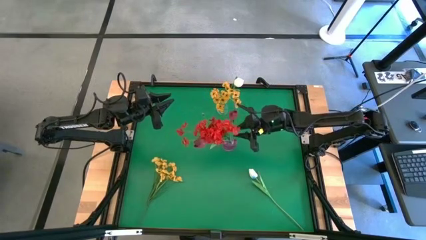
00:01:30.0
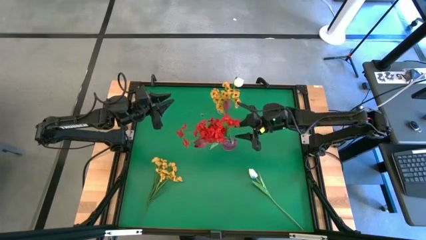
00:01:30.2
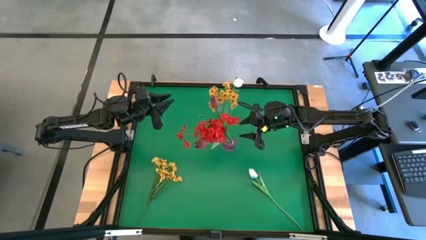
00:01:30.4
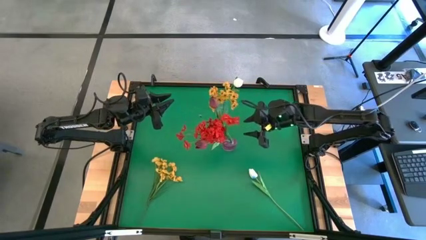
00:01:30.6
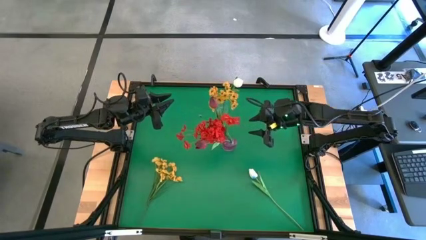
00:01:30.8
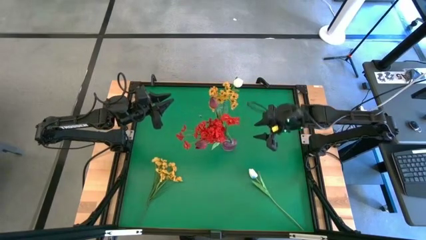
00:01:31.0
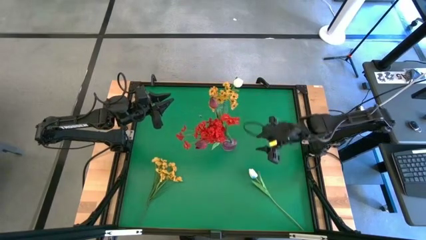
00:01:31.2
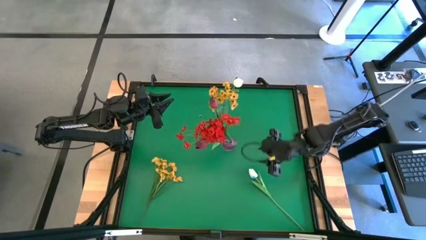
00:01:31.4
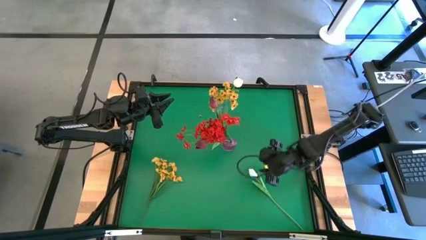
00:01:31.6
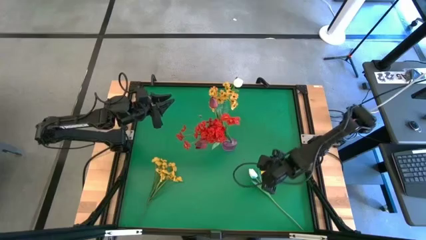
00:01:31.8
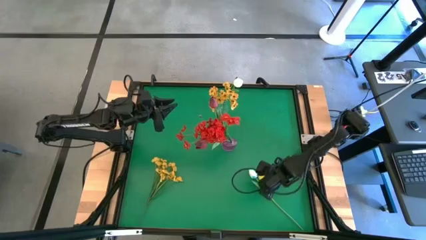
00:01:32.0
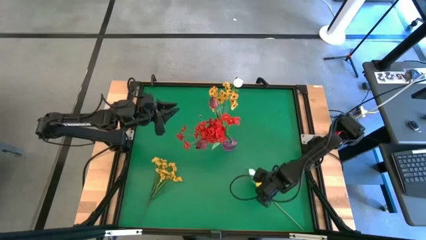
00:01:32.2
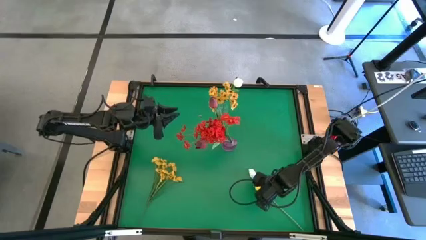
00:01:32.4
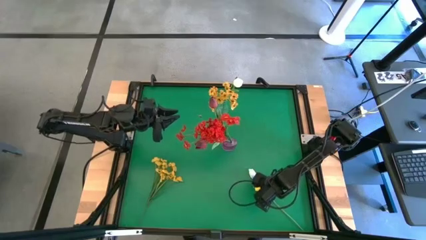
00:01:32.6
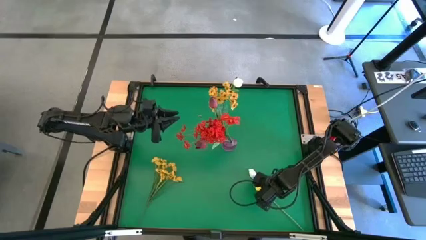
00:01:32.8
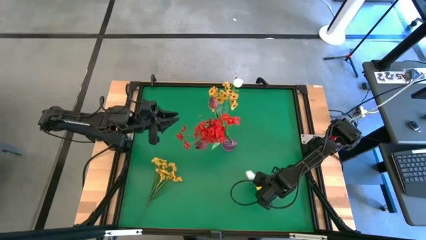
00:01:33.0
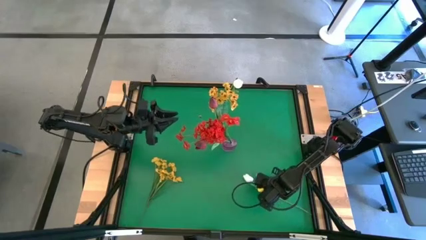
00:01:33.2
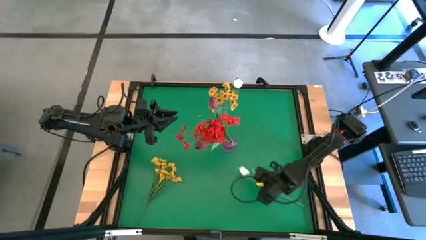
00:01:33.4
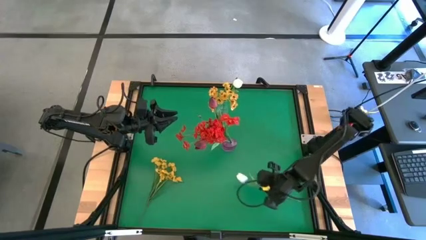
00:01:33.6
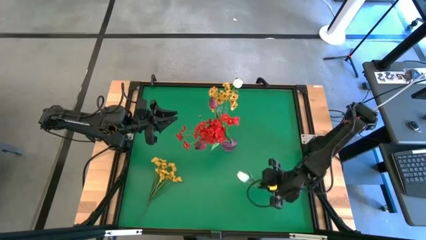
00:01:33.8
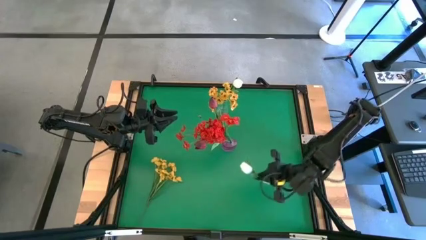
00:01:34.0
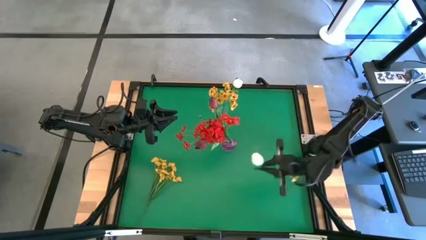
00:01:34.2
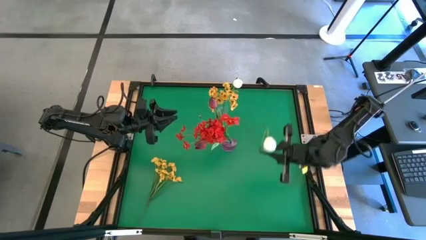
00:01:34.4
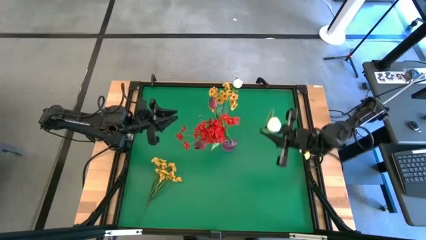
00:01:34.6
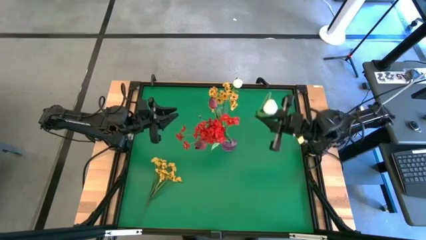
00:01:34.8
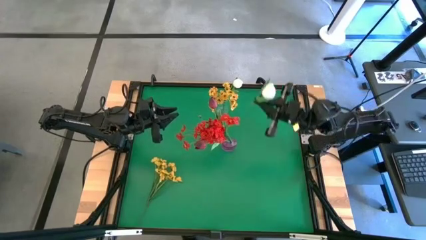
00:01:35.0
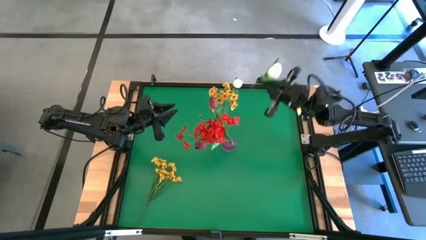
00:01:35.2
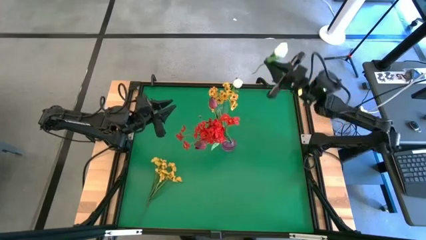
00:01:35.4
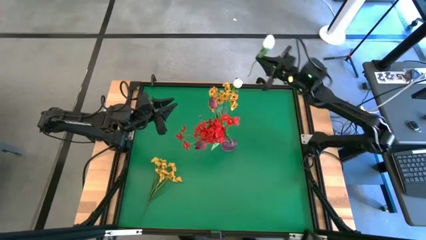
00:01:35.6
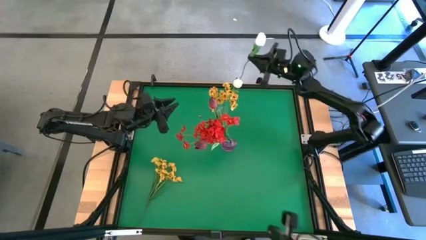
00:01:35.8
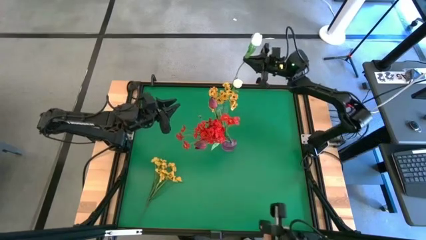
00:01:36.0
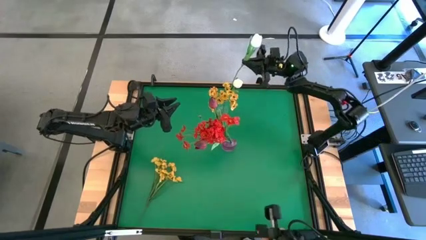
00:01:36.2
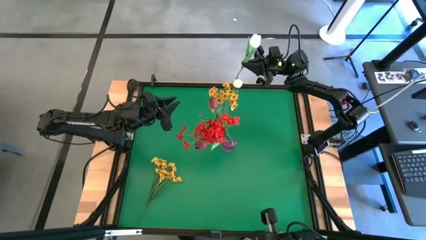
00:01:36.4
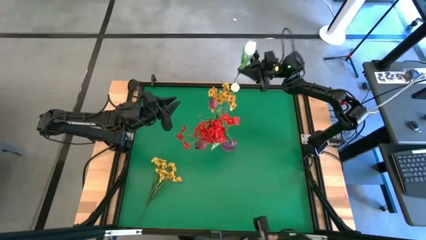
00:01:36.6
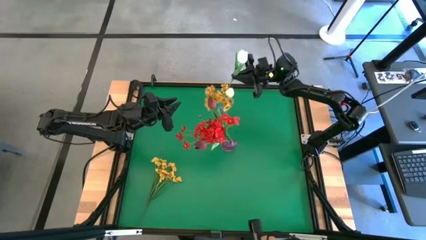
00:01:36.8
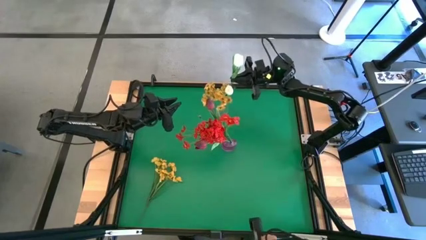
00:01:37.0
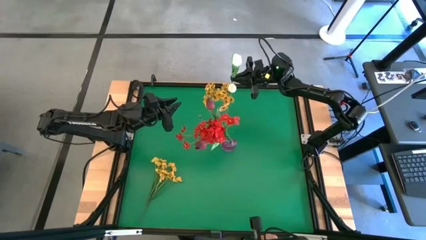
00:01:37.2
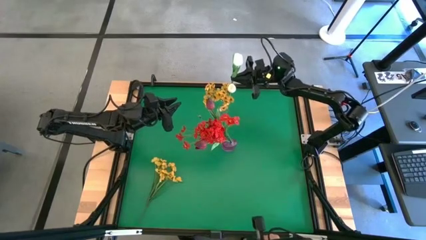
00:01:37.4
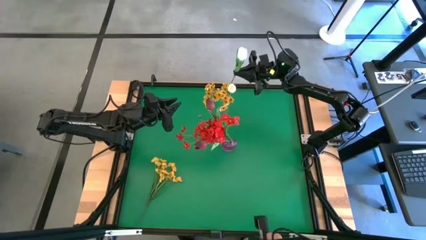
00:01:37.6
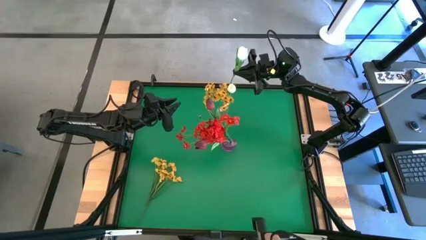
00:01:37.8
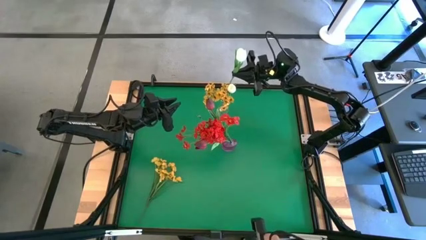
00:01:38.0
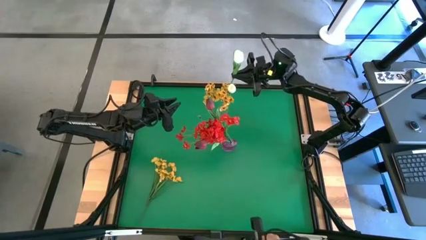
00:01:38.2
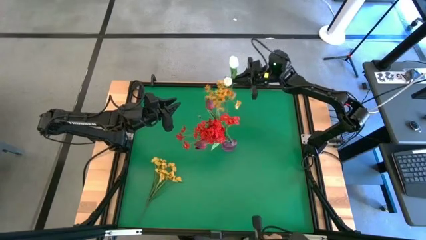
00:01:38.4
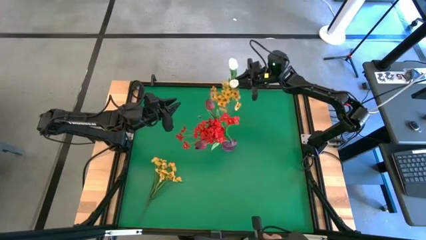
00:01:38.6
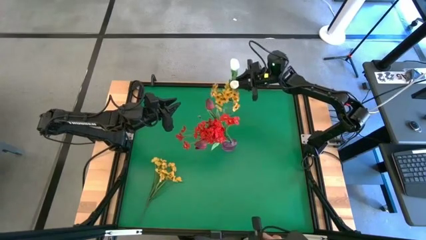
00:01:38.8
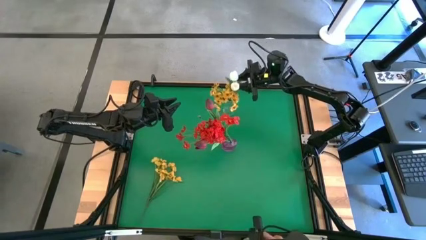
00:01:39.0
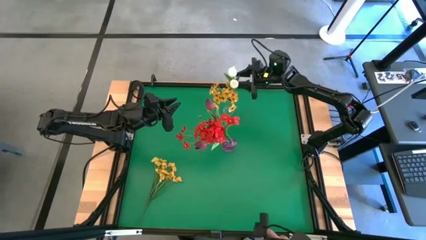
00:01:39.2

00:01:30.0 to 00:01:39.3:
Task: Sort flowers into vase by color
Put the white flower into the transparent vase

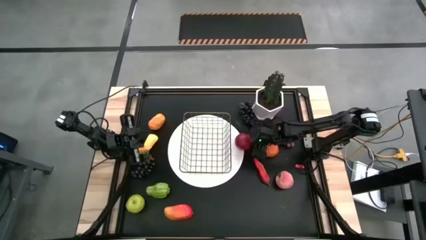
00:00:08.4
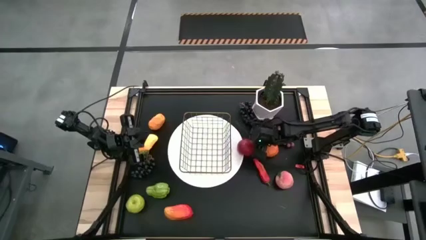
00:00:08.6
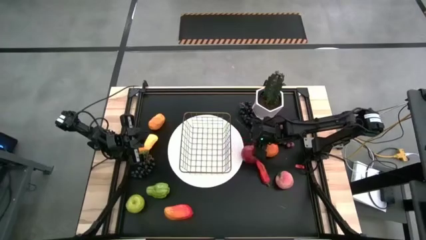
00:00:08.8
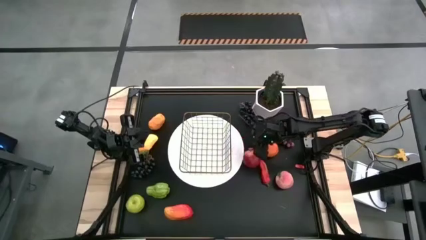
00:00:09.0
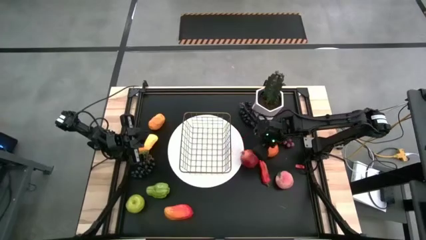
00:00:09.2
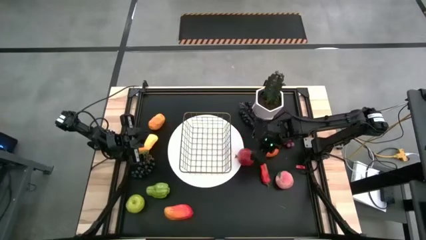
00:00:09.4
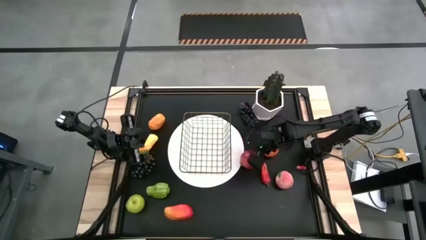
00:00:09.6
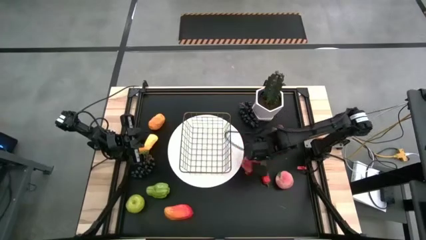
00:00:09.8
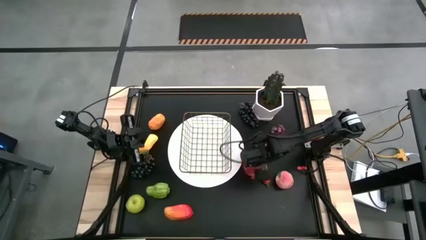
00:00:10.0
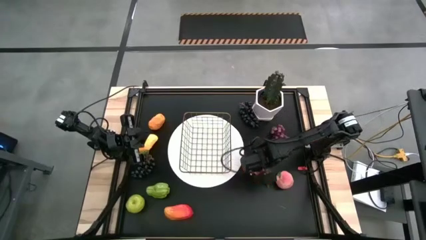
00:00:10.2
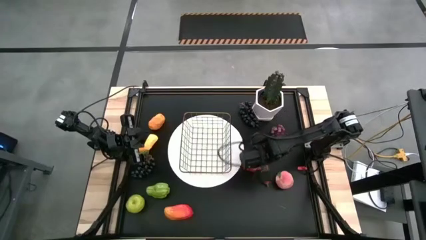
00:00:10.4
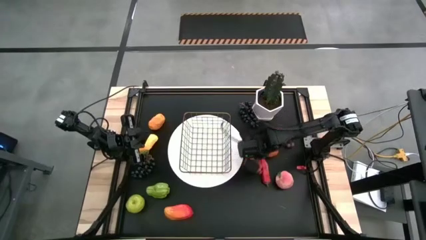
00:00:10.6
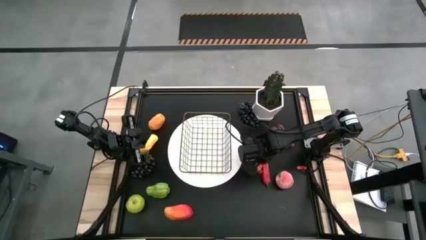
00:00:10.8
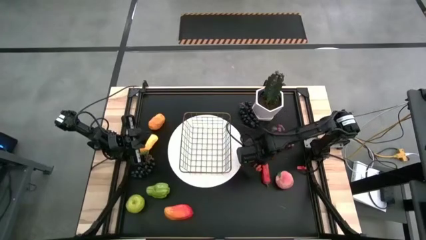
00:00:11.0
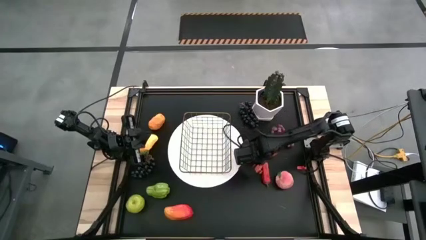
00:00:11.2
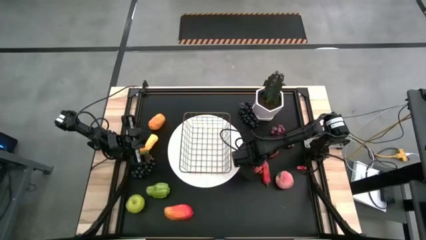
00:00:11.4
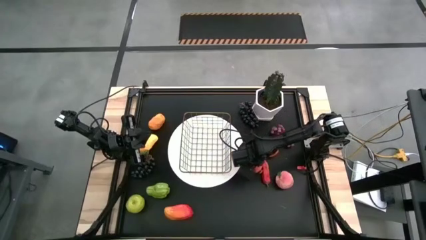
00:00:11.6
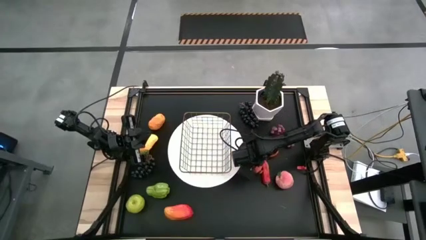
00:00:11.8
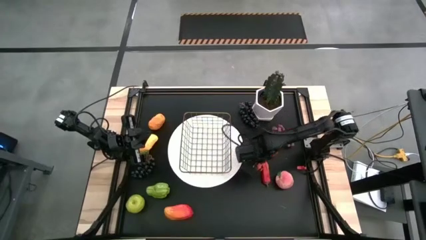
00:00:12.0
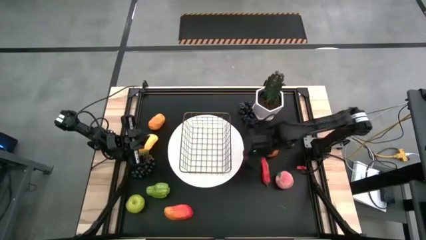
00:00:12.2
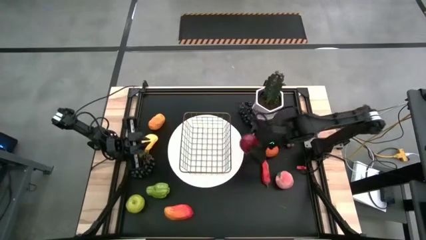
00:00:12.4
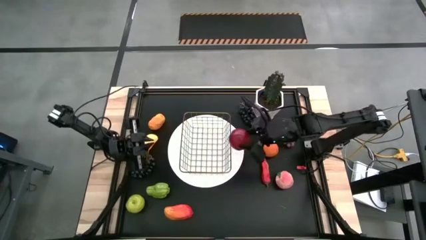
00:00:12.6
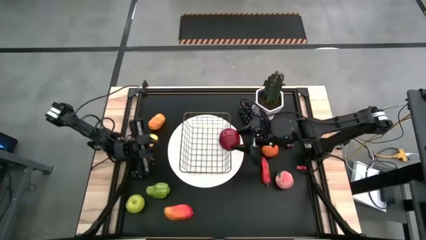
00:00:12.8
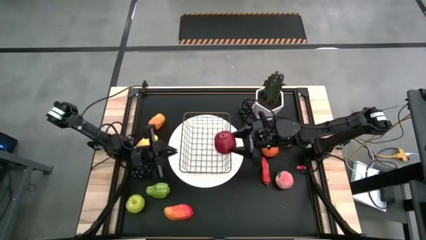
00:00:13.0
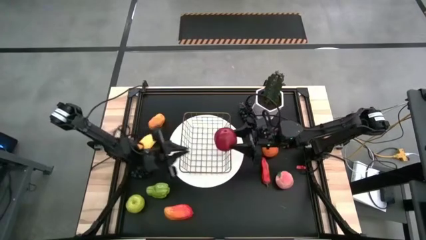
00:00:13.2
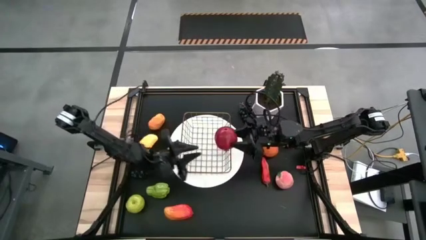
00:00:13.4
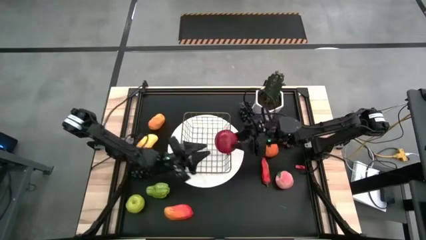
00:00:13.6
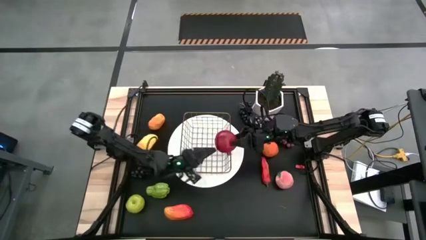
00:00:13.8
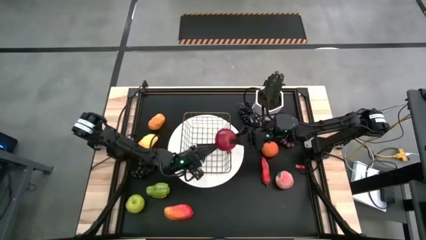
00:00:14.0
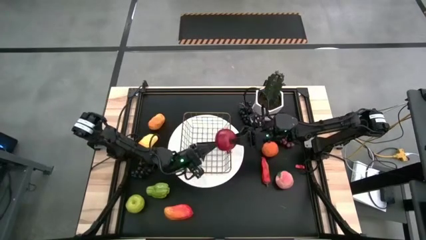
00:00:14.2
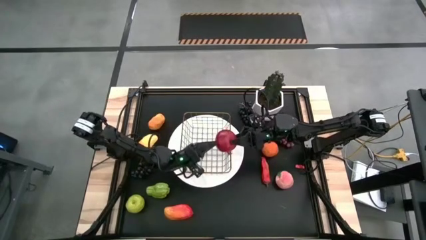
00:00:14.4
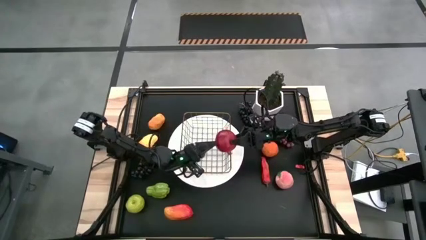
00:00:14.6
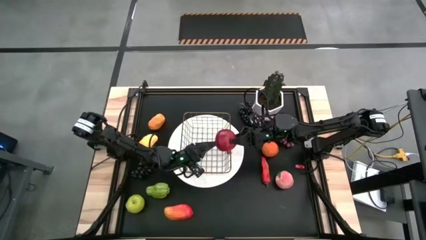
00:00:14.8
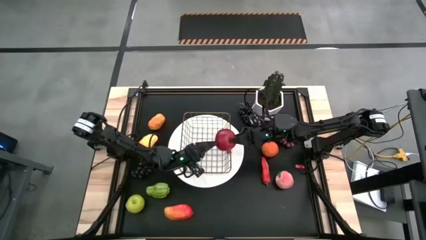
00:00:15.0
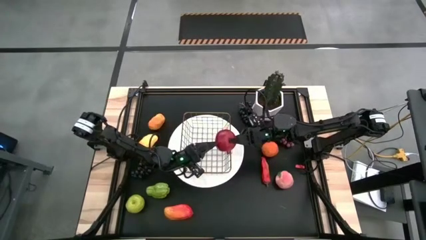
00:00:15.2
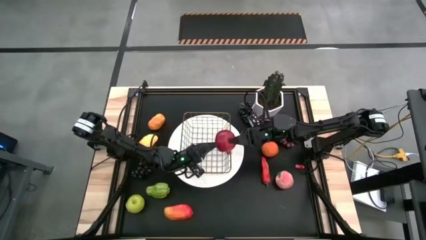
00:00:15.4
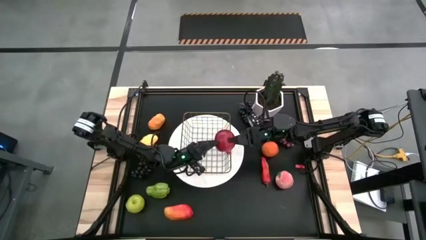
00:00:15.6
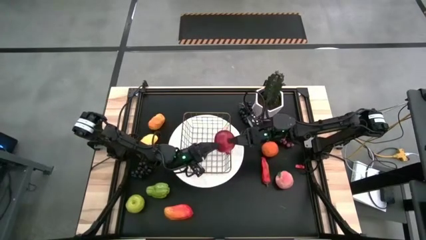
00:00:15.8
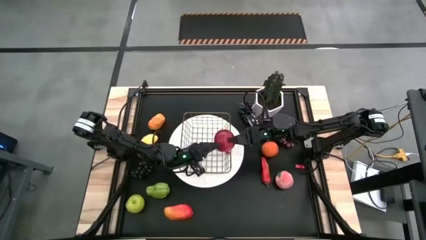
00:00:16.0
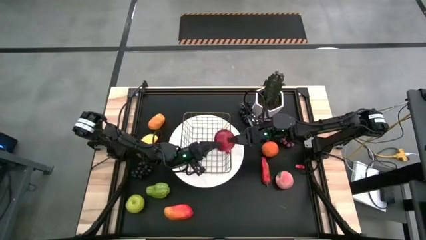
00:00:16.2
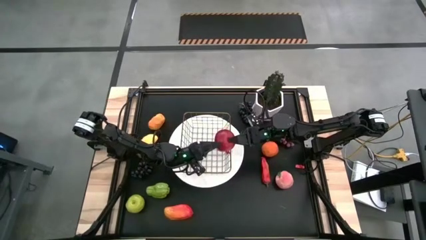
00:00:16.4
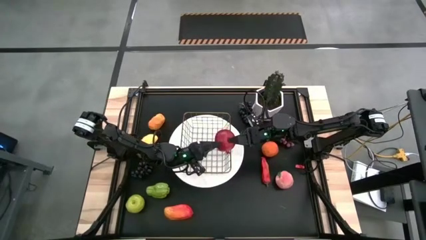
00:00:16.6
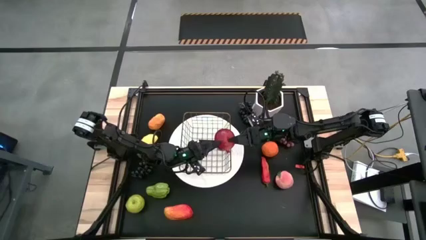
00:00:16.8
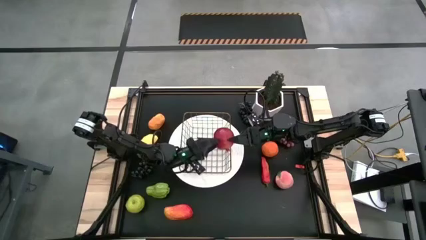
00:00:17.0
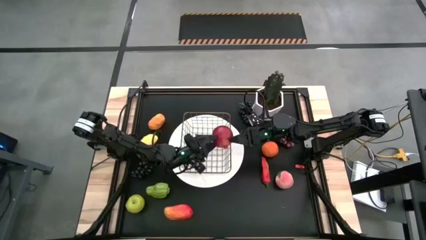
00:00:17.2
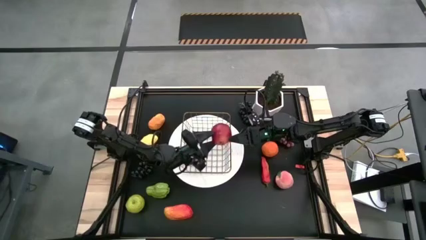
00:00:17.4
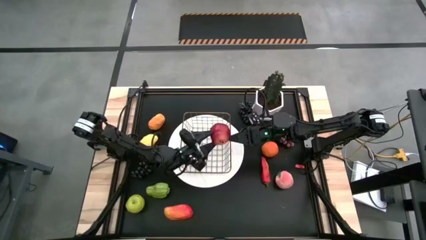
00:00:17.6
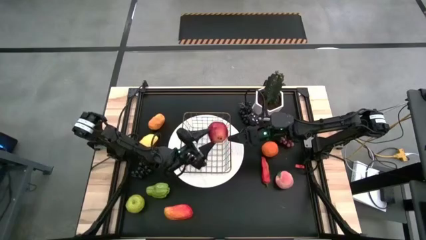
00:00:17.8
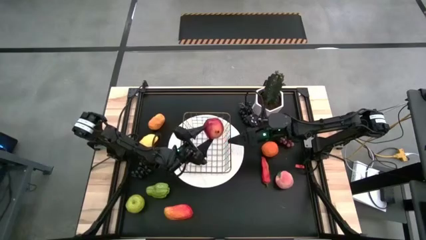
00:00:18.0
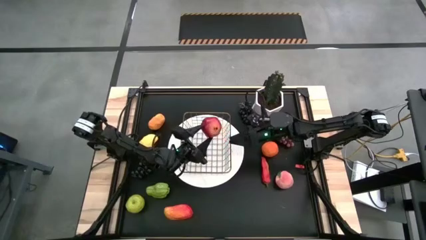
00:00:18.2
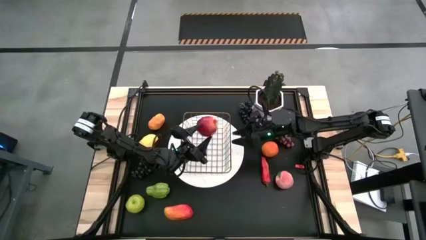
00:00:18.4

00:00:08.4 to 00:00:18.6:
Task: Build produce basket
Put the pomegranate into the wire basket
